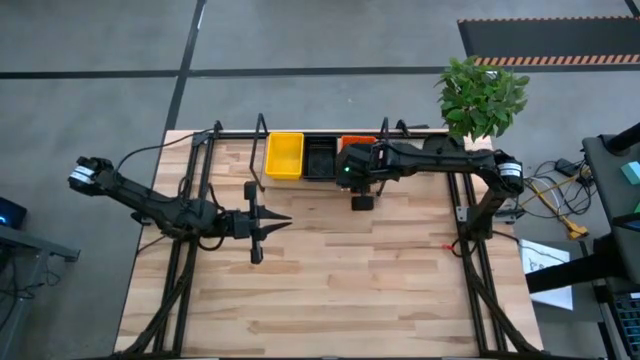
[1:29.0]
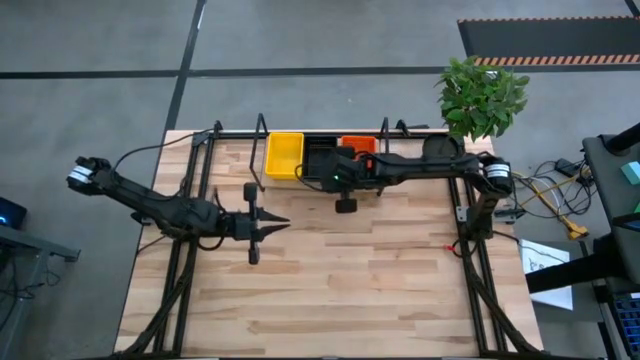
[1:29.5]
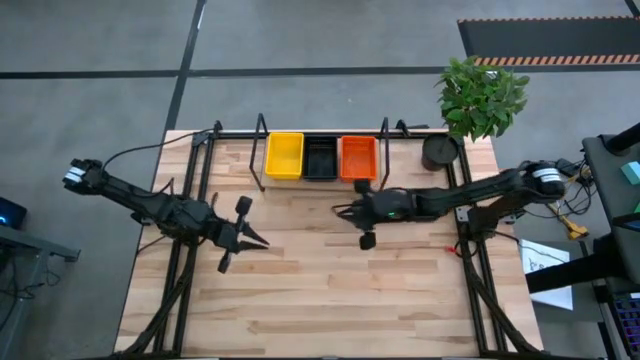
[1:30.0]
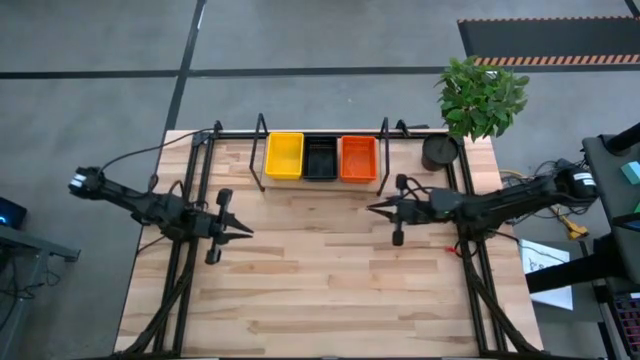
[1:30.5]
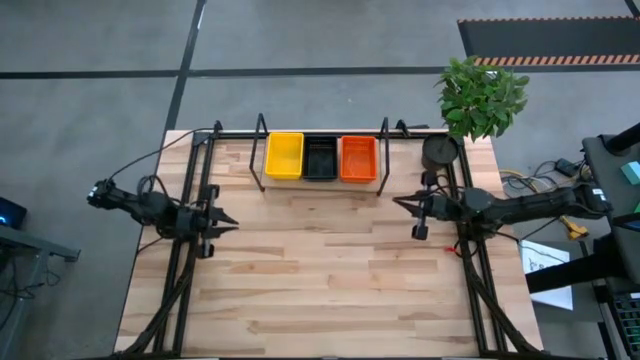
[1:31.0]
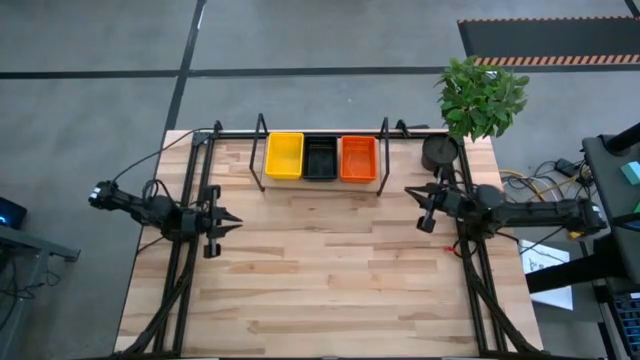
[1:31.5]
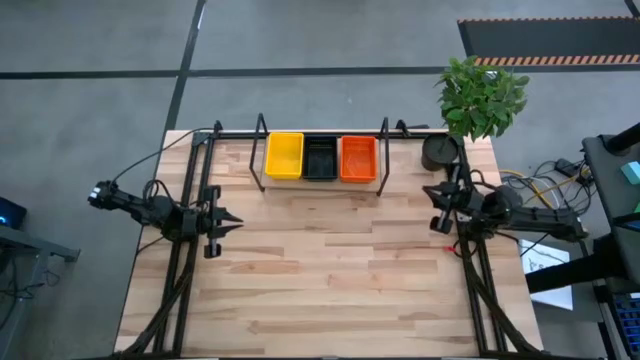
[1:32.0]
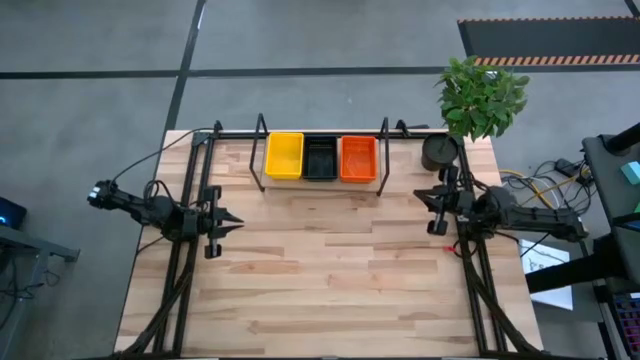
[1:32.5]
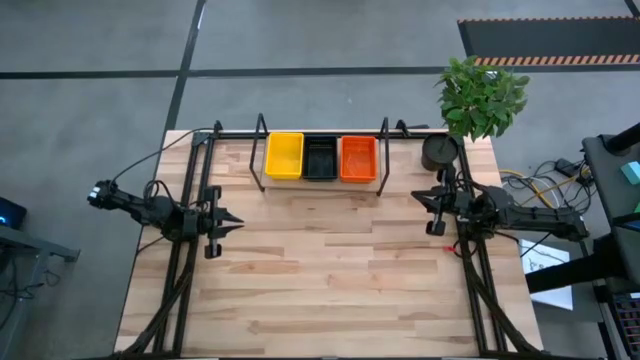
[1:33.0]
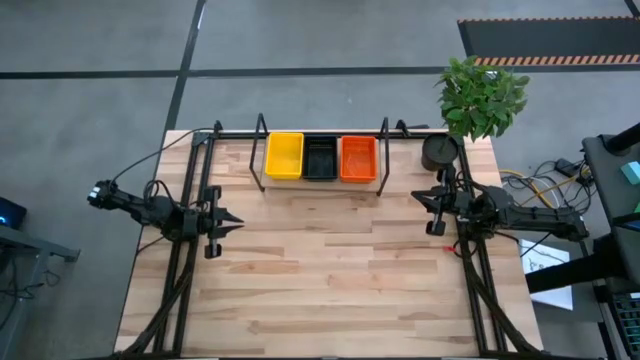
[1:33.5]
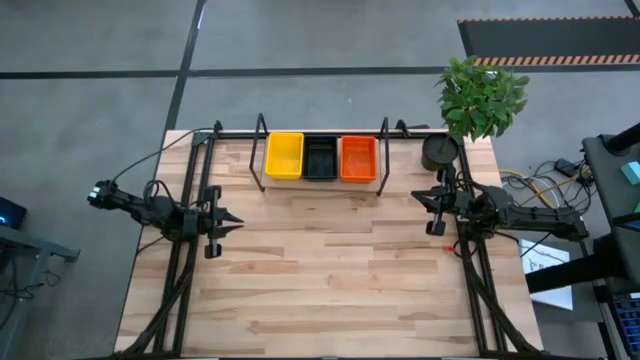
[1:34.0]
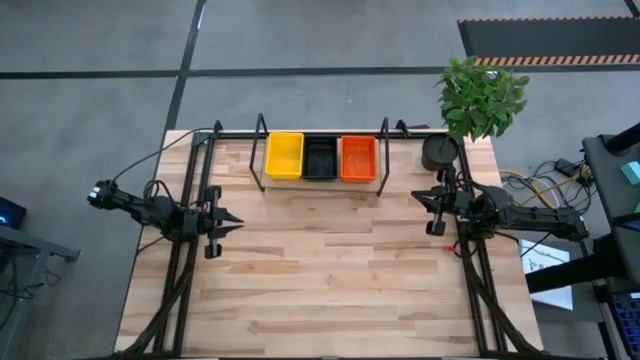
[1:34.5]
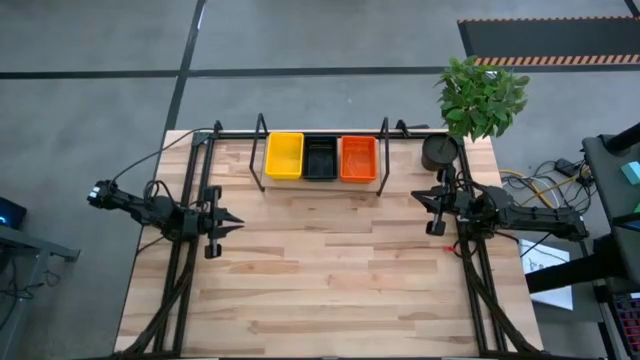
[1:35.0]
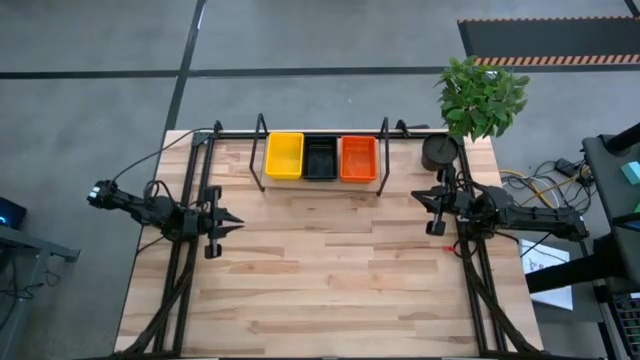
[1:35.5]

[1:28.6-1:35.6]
Task: Stack baskets on shelf by color
Return to Home Position

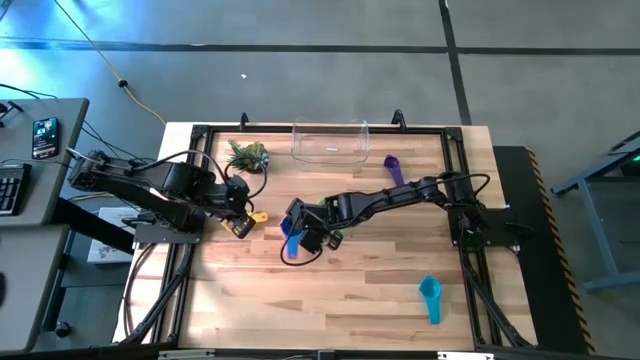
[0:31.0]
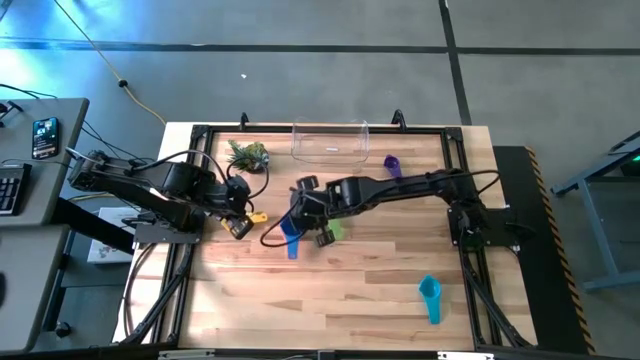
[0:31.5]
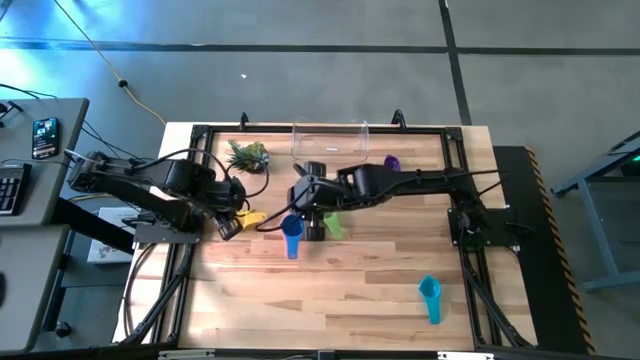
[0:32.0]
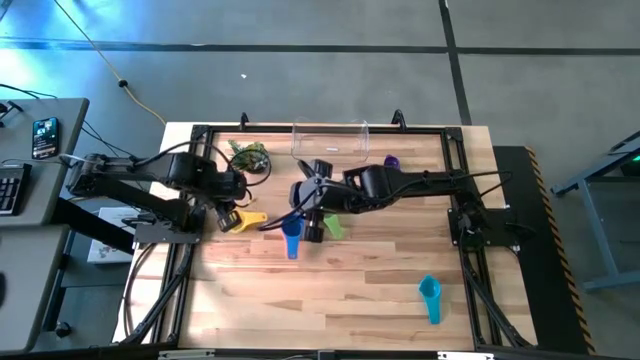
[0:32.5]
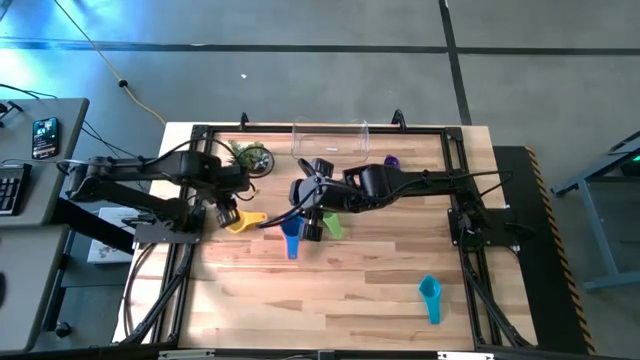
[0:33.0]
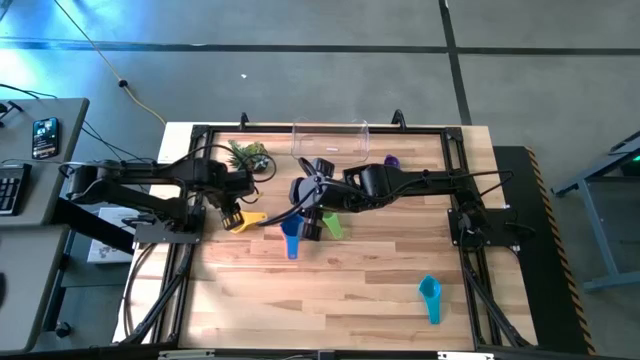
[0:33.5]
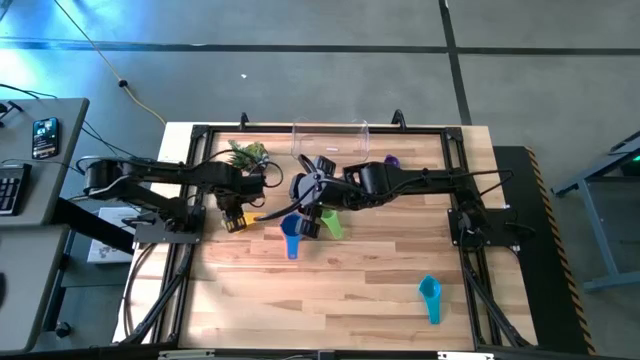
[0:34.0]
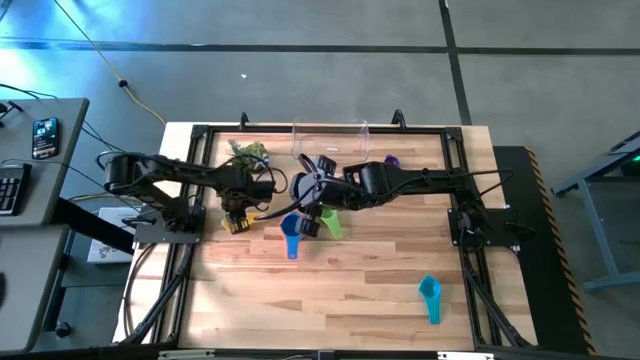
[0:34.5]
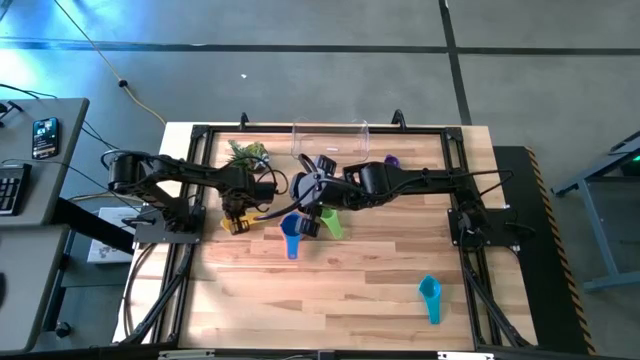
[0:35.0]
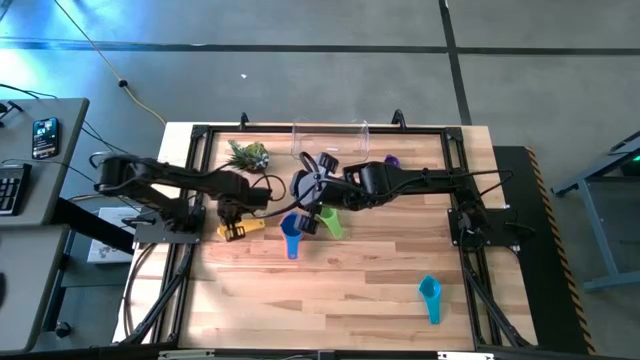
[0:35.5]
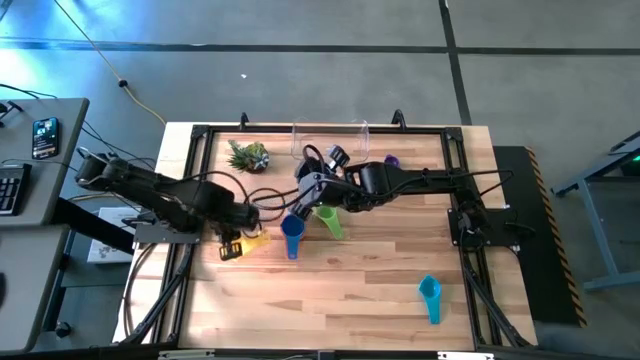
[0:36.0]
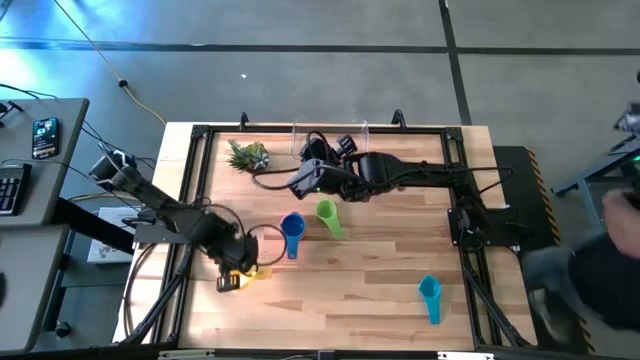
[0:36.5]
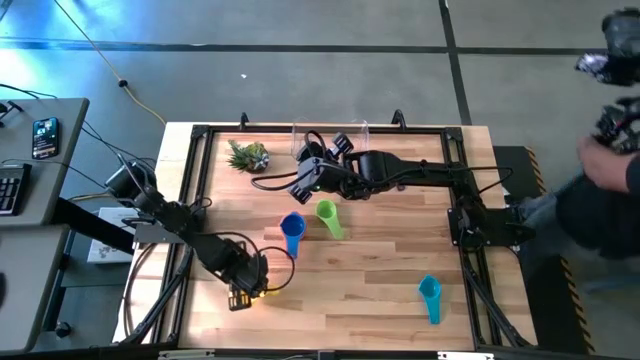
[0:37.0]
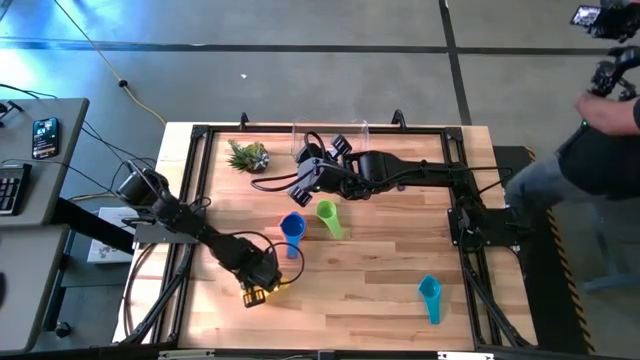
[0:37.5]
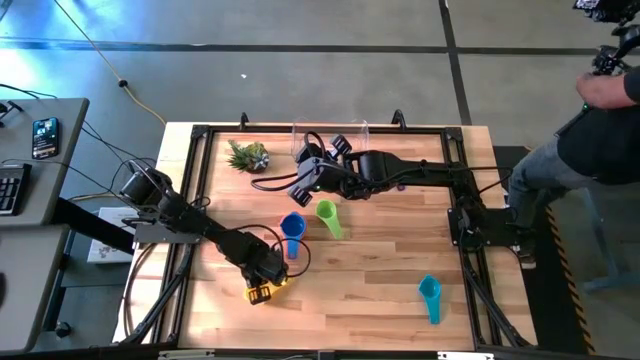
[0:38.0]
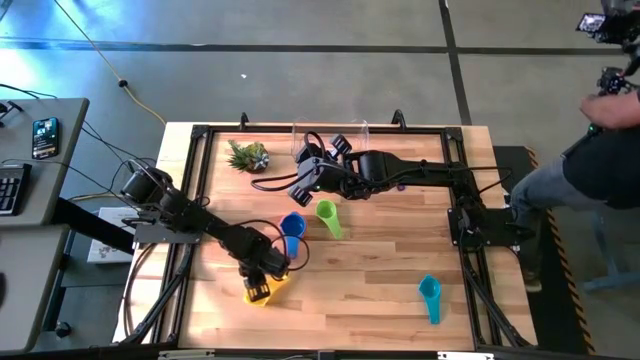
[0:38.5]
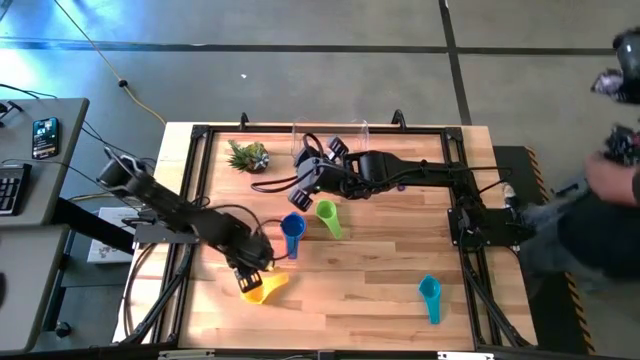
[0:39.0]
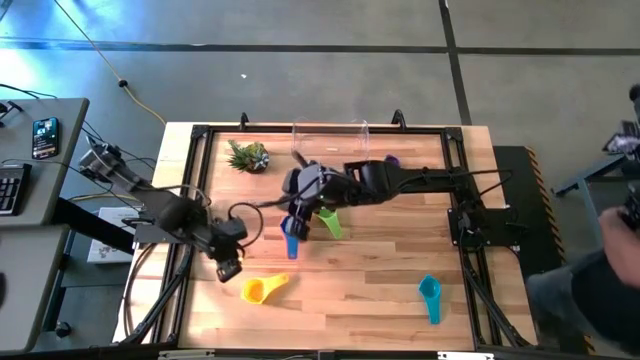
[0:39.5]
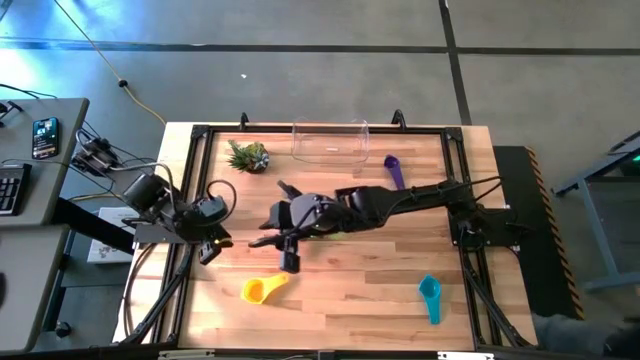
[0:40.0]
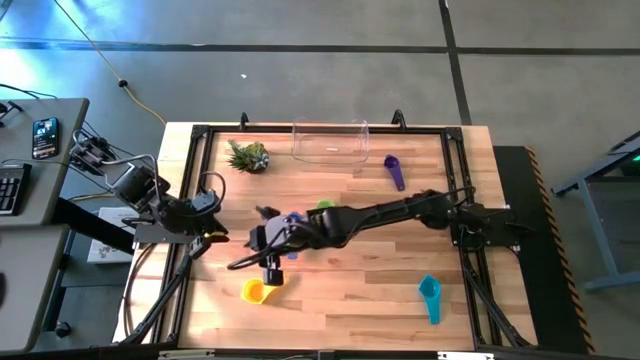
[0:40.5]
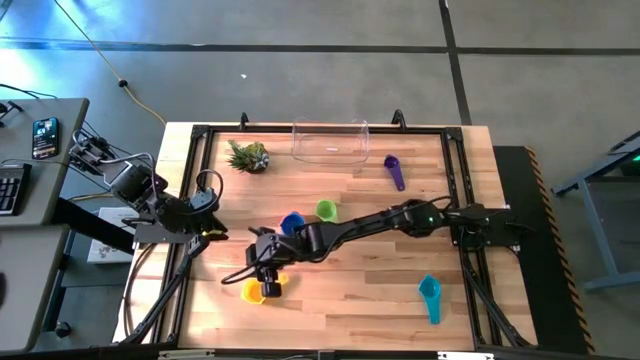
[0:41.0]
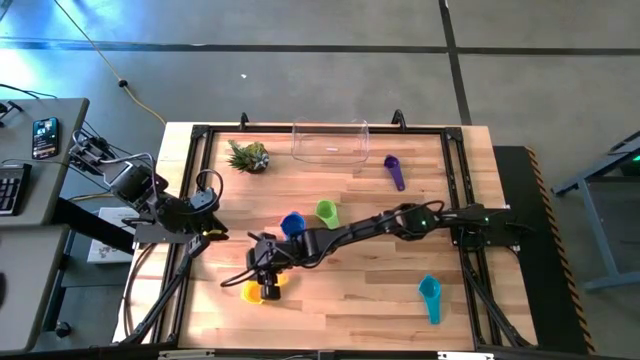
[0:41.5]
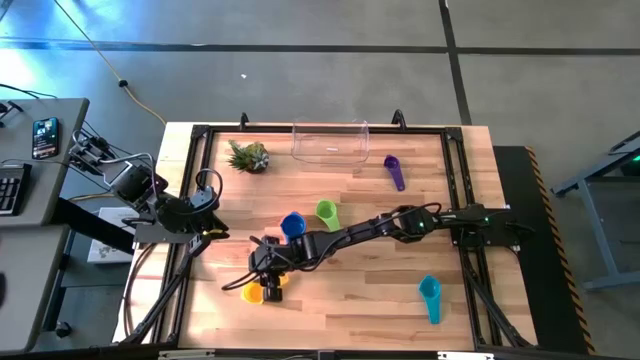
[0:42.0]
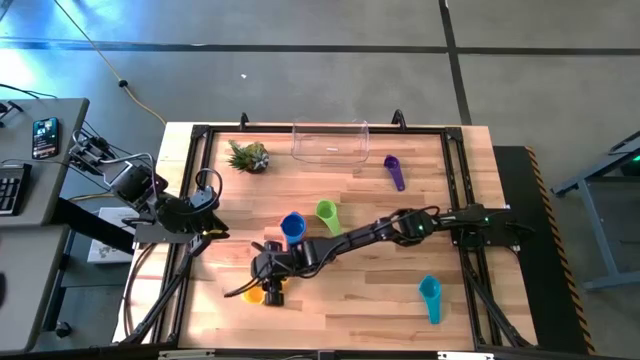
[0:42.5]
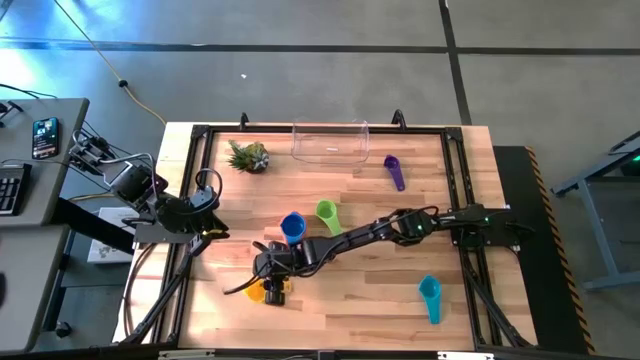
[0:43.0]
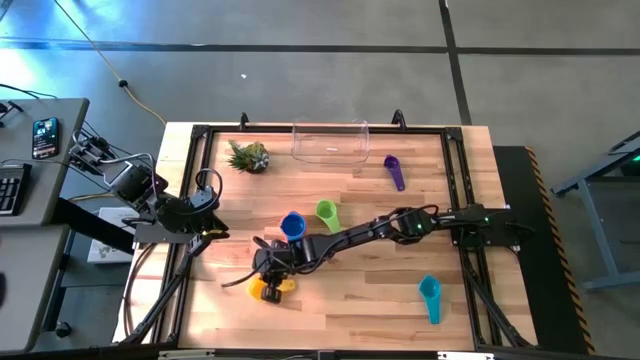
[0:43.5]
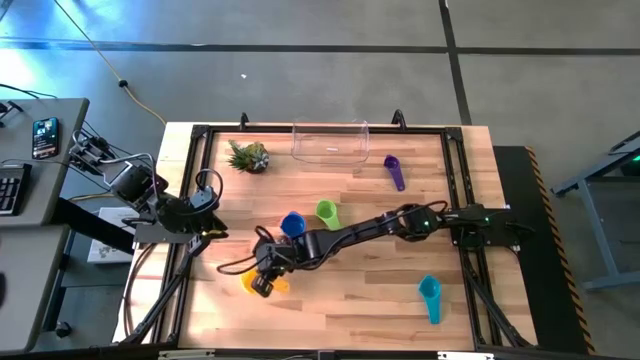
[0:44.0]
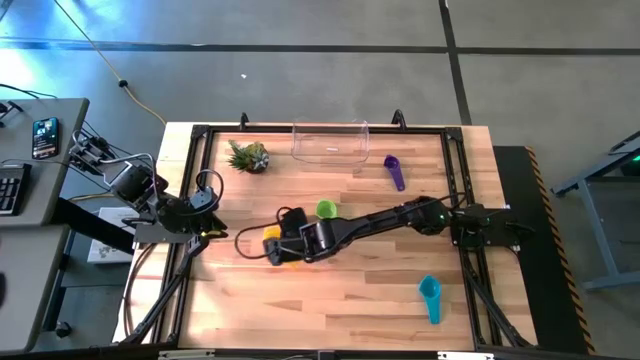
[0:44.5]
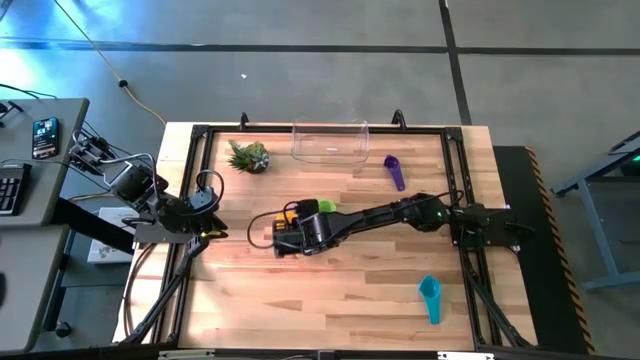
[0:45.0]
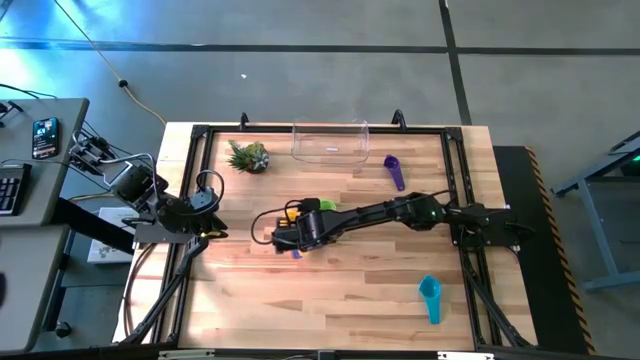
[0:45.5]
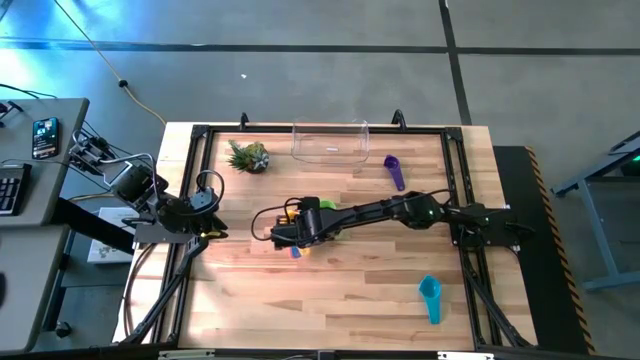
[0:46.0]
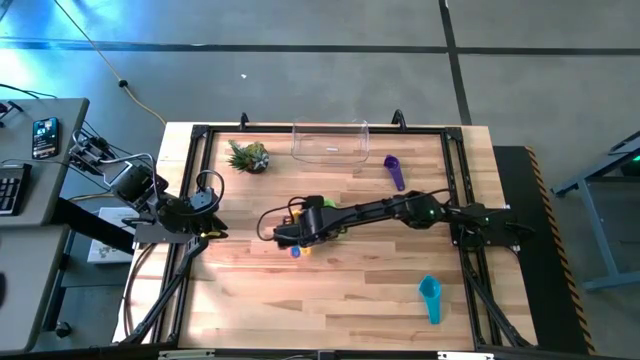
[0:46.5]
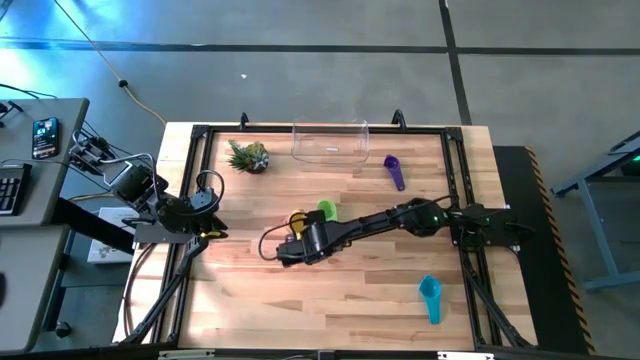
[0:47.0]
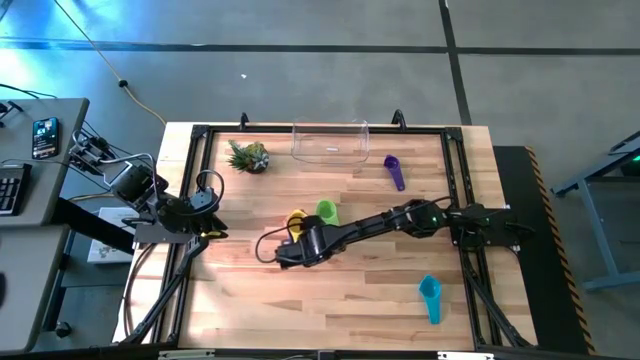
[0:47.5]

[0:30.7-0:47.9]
Task: Nest measuring cups in basket
Stack the yellow measuring cup on top of the blue measuring cup
